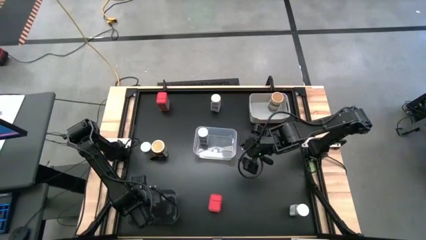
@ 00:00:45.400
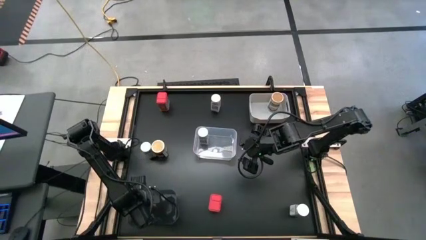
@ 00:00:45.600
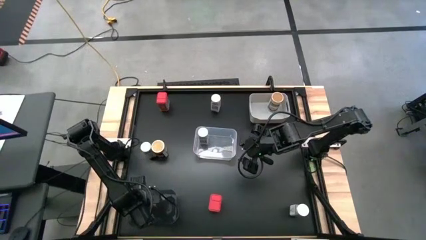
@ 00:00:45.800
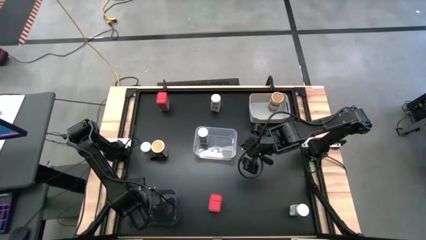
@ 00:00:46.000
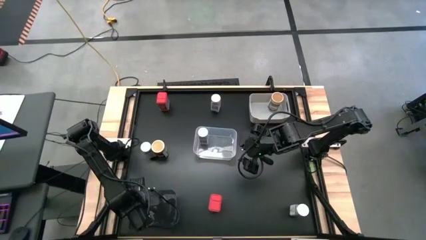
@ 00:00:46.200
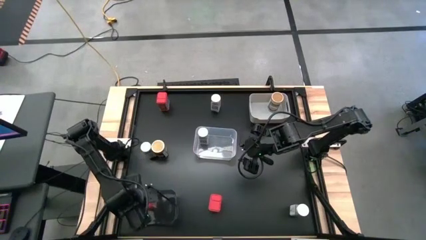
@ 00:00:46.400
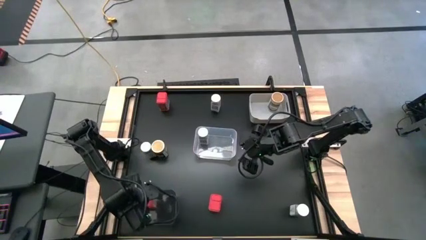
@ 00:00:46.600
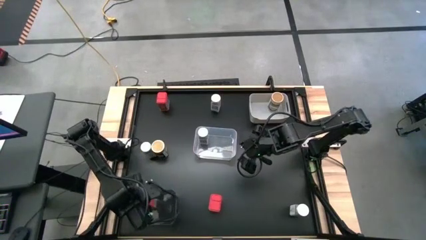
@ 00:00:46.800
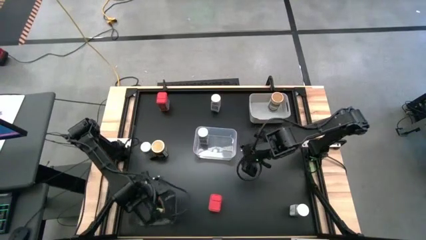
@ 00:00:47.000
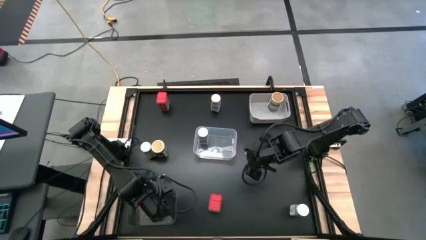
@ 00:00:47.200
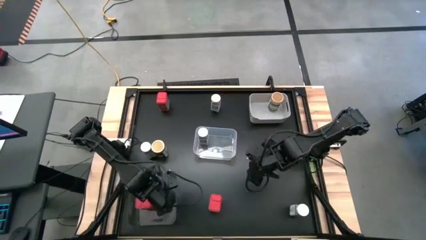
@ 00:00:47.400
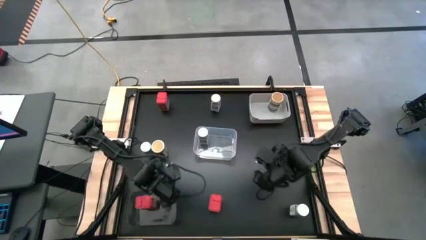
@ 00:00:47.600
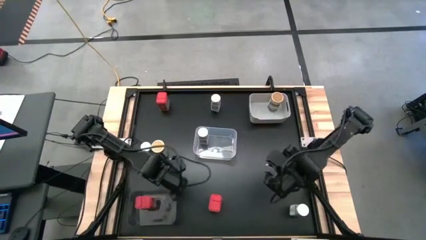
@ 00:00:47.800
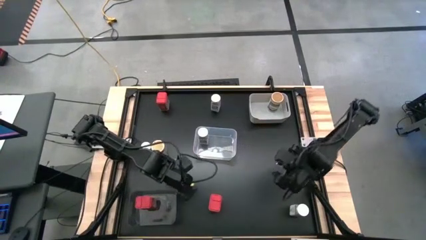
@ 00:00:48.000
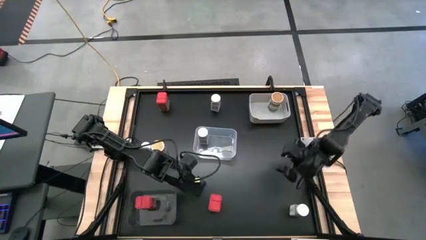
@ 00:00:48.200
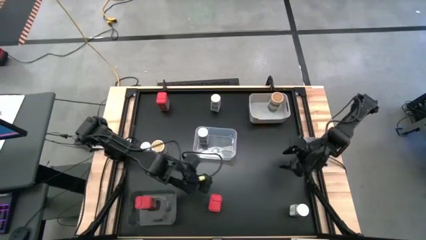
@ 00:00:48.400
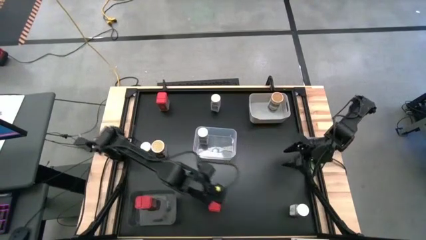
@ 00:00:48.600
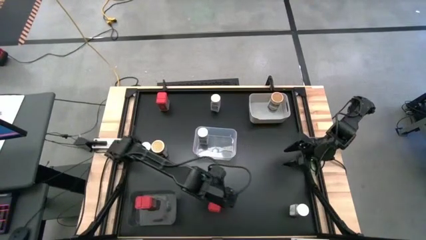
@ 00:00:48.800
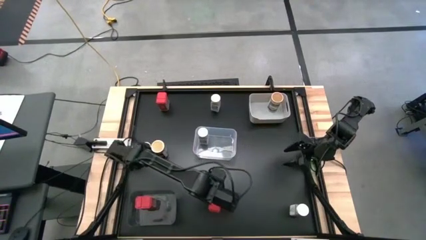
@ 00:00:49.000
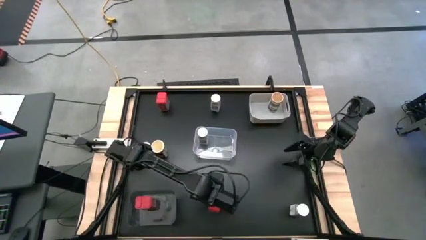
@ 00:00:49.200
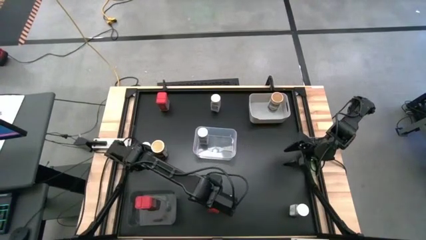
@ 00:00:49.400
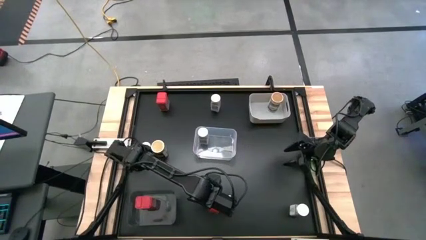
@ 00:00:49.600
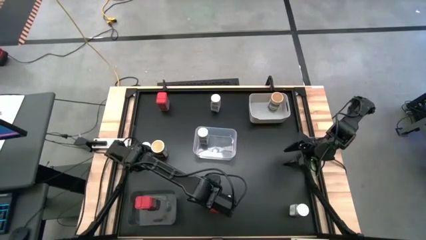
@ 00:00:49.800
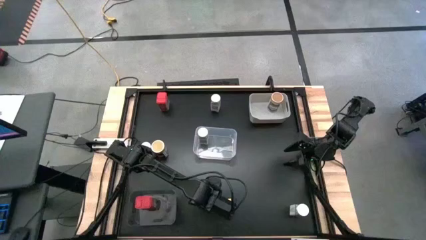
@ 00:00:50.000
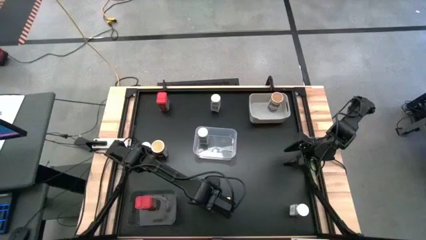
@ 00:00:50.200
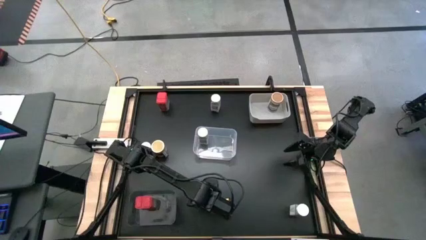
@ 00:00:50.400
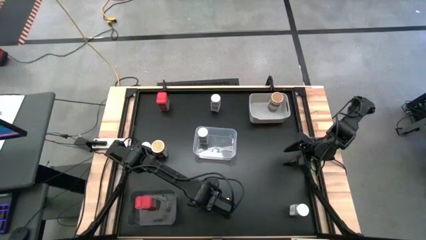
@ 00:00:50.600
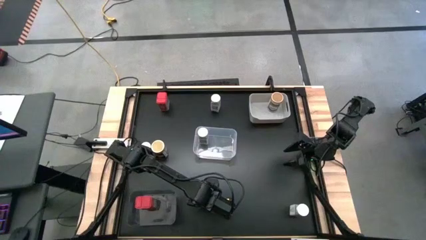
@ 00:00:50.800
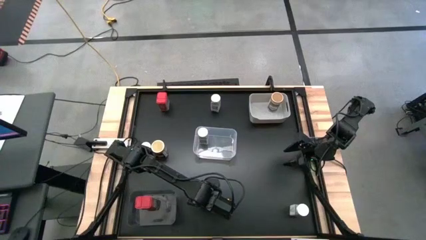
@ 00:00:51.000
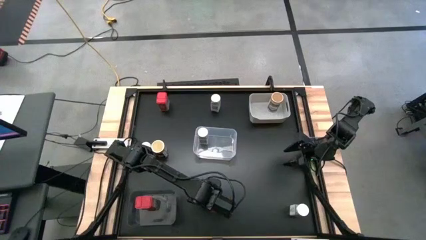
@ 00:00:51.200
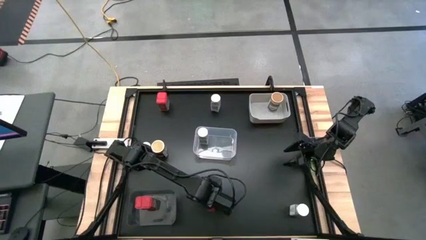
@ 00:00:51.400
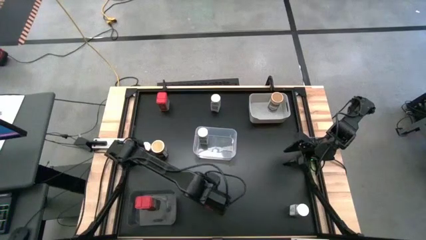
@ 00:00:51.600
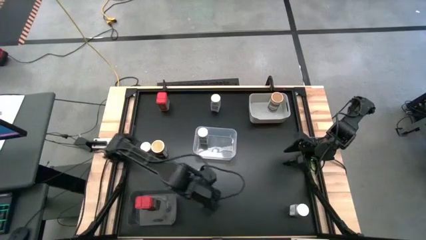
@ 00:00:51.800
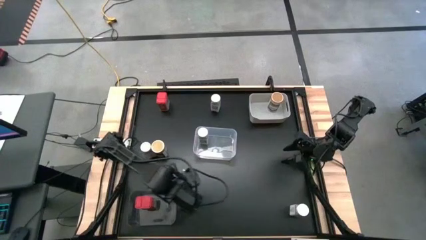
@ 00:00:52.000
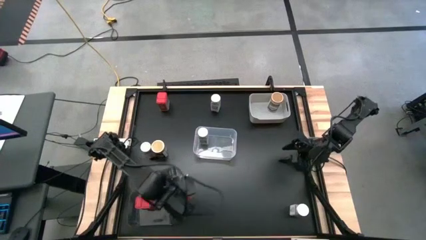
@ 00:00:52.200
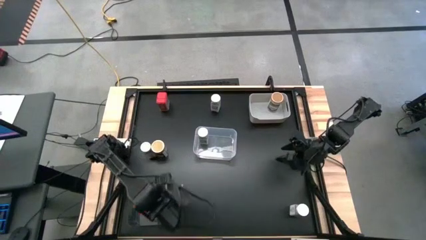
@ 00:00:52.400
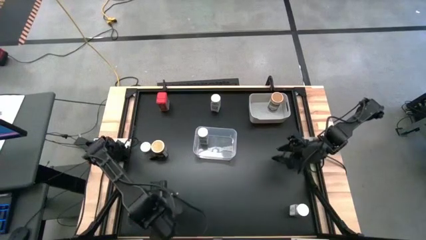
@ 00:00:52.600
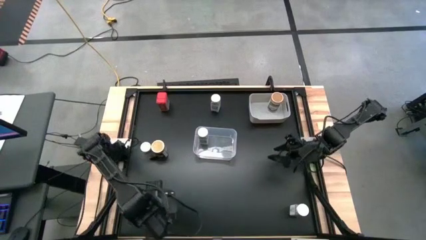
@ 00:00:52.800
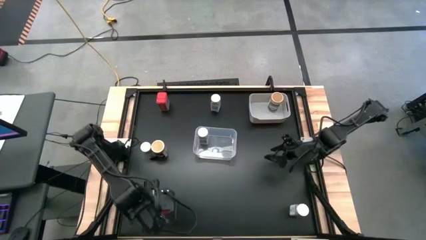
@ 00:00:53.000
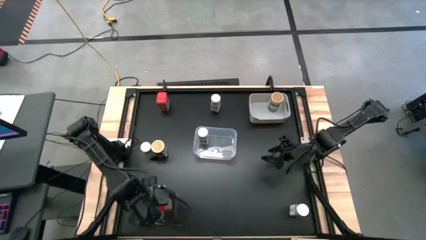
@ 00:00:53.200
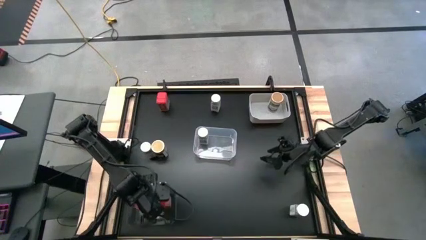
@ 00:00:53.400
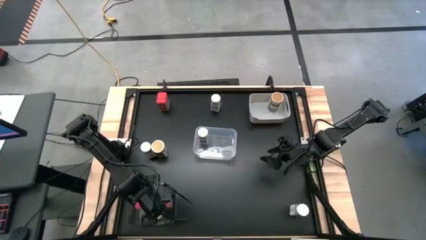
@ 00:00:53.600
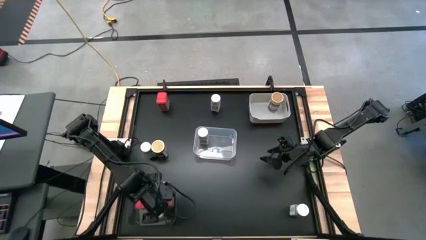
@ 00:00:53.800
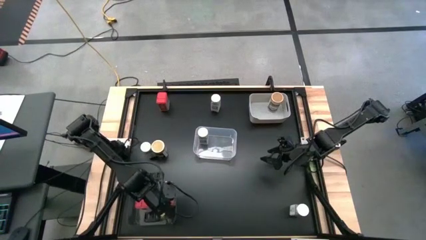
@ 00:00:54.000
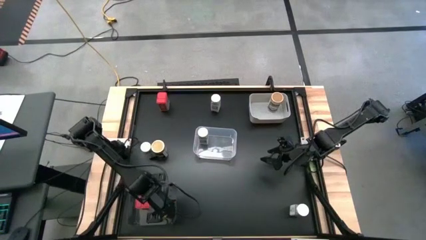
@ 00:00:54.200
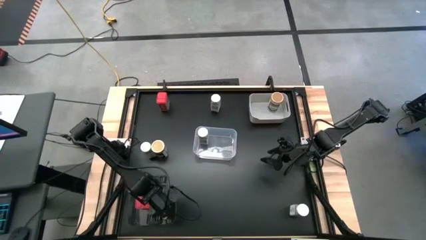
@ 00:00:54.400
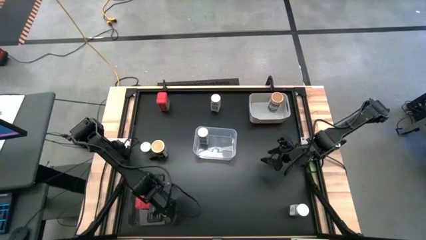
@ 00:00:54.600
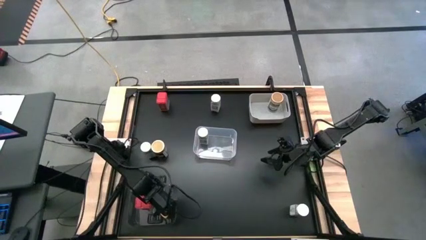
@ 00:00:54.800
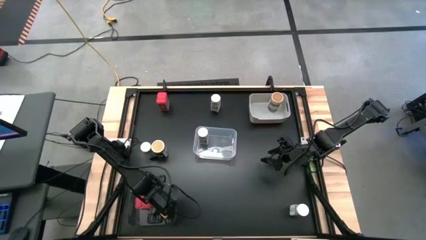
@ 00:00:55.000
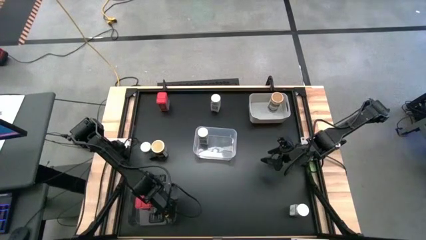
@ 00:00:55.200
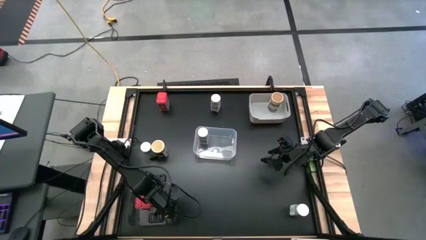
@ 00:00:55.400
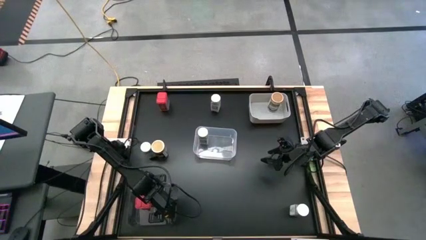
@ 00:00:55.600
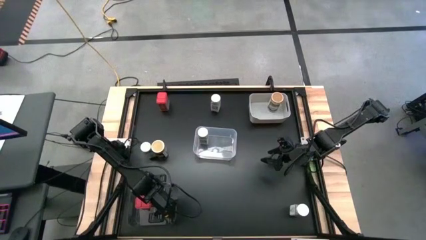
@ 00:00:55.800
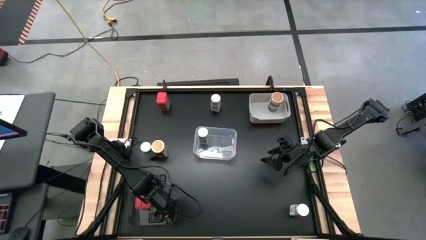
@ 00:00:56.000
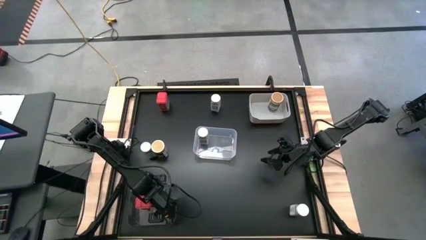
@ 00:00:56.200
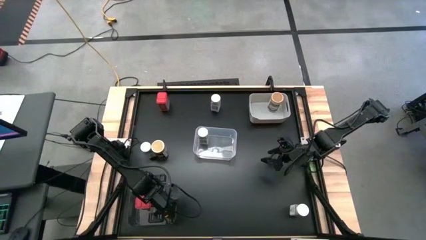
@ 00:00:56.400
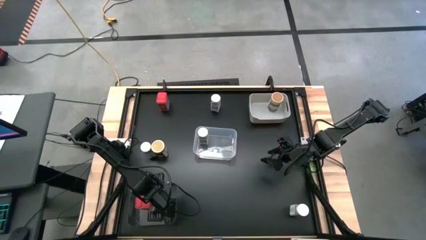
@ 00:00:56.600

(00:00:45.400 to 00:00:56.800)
Task: Sort spices by type
Put the red seasoning can into the black bin

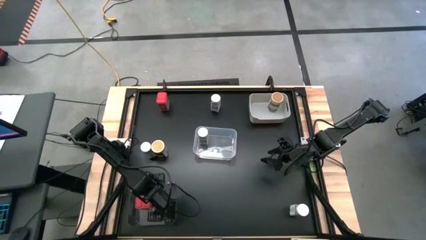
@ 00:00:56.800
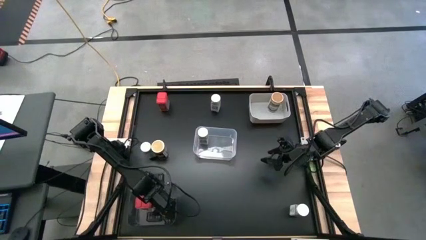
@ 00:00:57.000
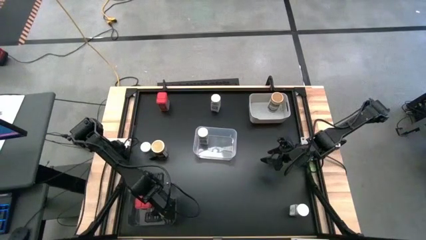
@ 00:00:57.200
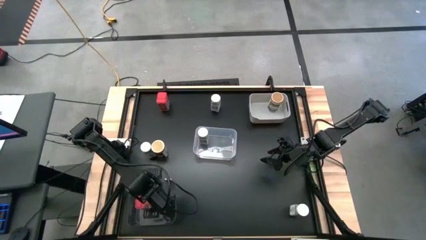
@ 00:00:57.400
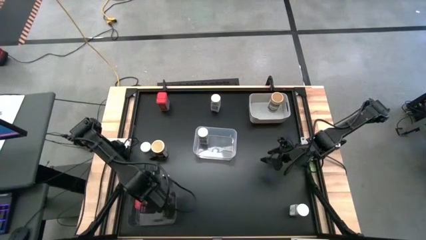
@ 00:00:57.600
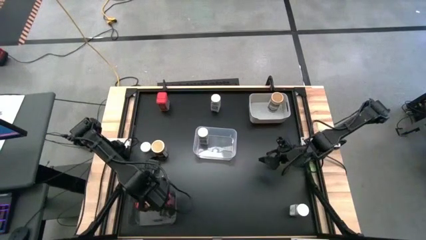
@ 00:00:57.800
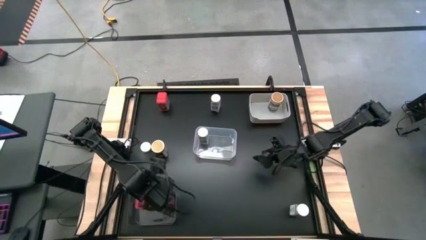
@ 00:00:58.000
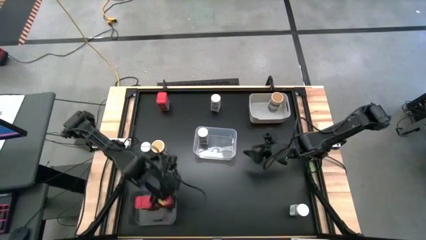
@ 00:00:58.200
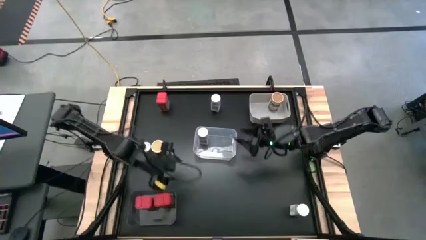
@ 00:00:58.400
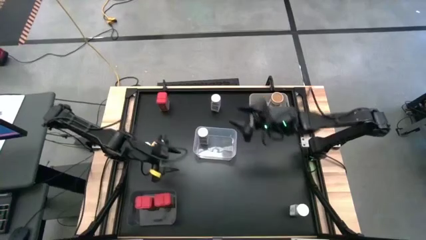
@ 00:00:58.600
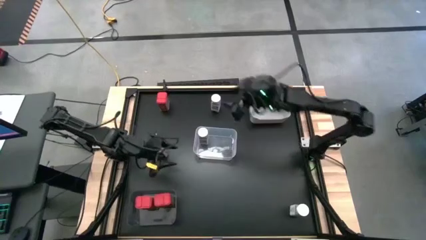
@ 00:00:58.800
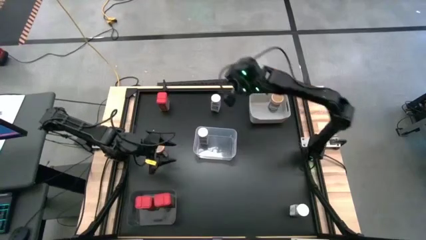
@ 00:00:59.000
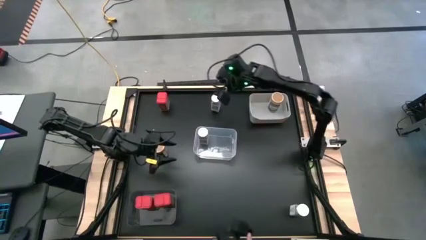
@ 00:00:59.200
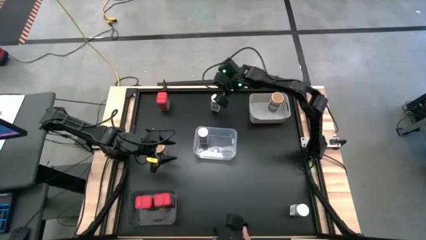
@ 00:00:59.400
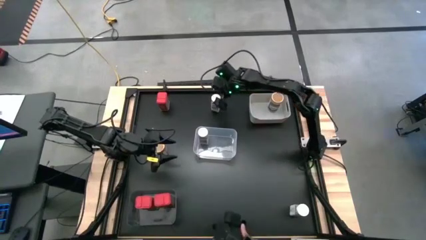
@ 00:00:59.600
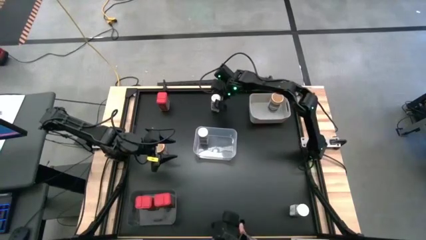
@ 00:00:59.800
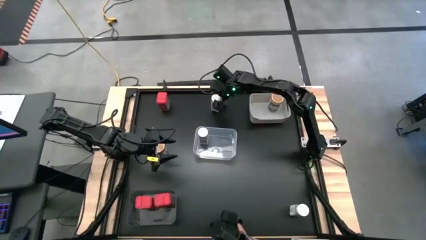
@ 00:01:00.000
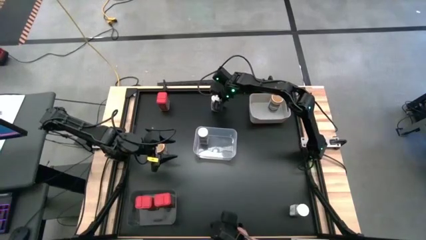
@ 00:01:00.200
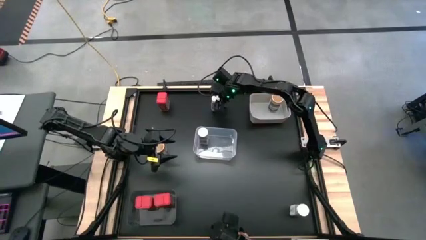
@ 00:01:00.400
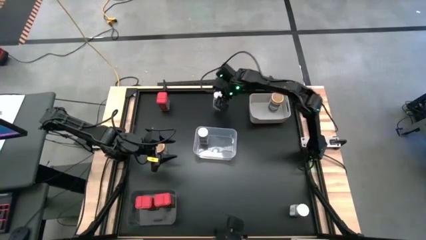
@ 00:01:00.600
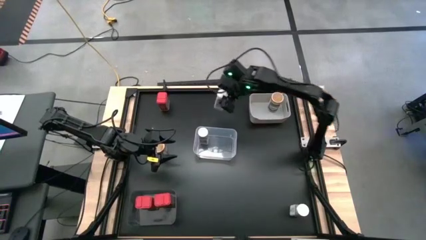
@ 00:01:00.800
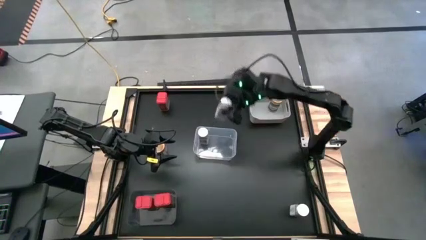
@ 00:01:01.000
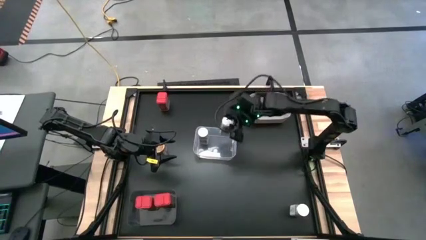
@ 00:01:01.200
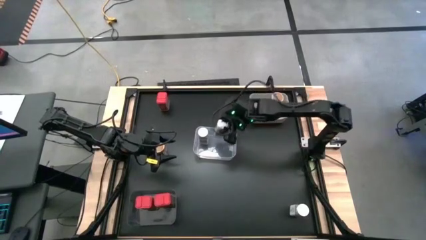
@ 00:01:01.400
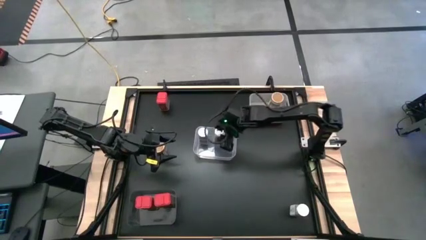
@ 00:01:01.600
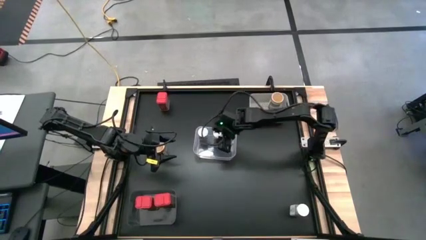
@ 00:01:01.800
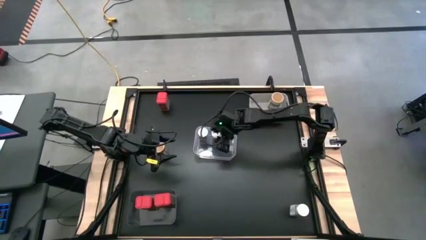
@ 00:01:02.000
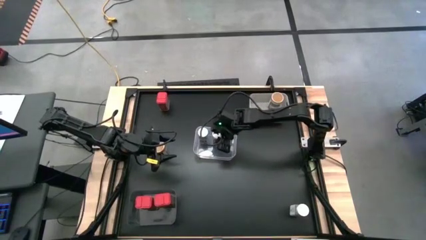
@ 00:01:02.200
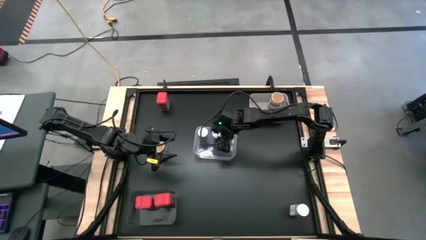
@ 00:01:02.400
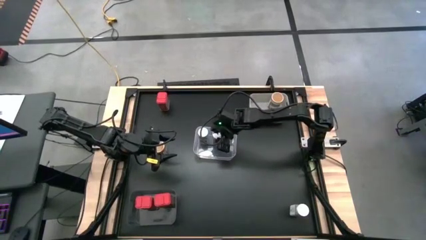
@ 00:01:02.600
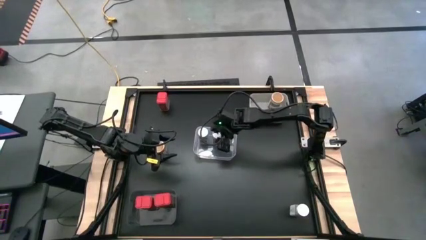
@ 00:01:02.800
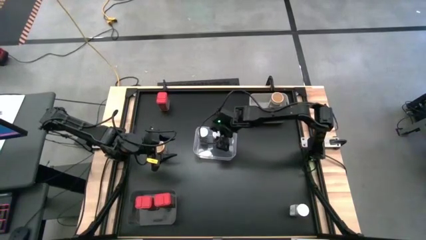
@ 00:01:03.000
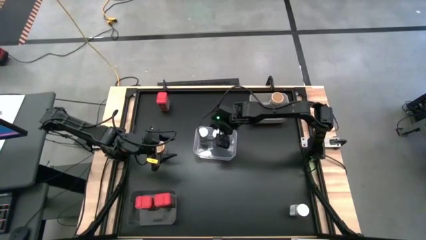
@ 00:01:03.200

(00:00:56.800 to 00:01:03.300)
Put the white seasoning bottle into the transparent bin
